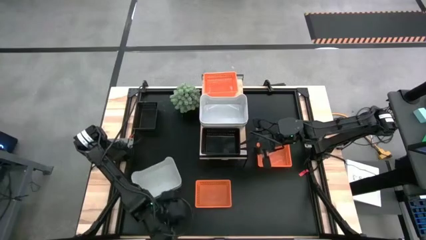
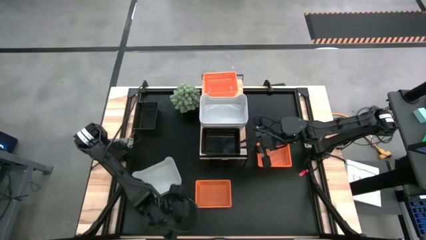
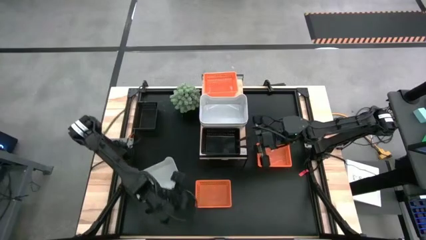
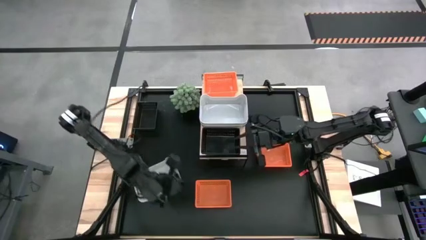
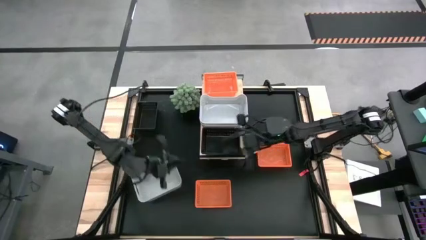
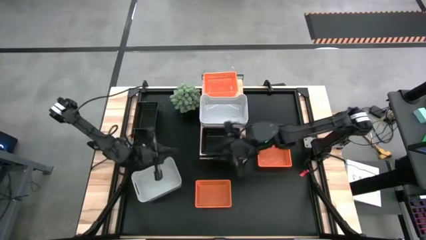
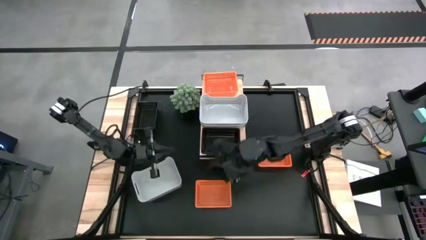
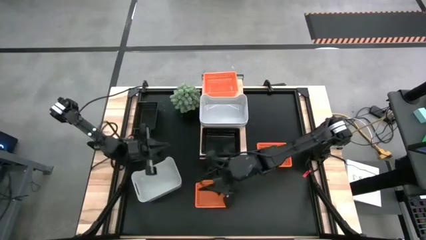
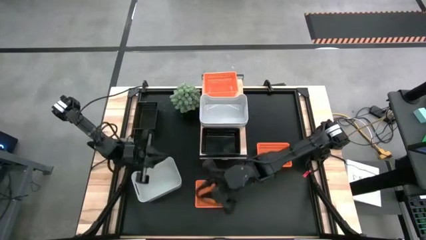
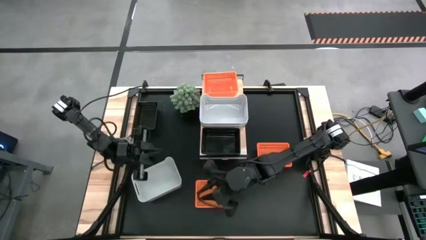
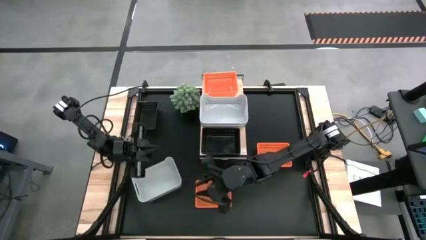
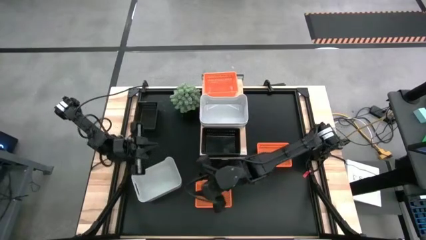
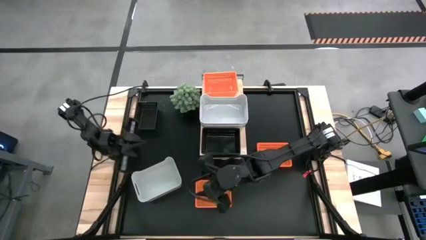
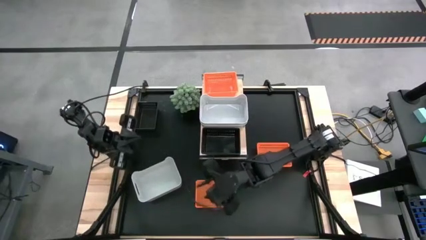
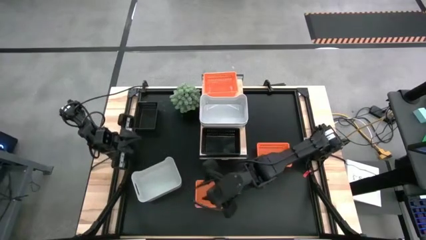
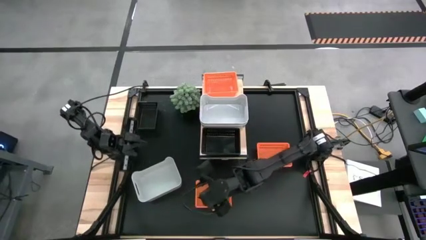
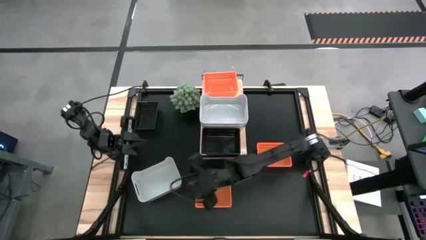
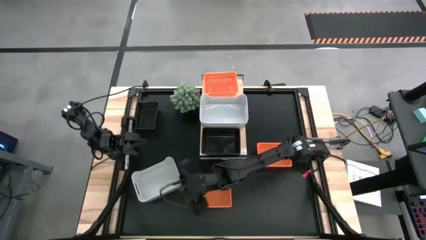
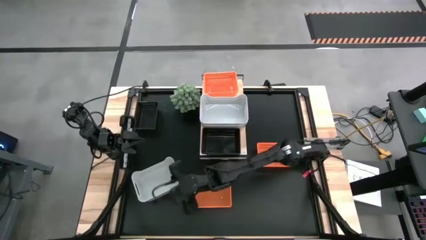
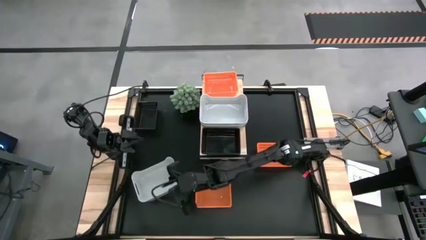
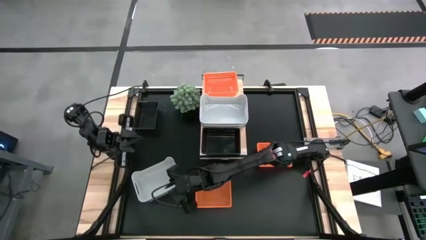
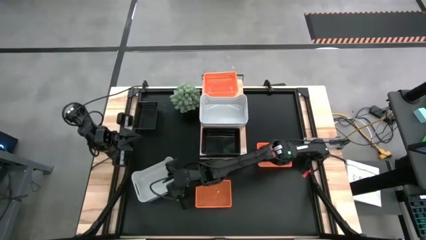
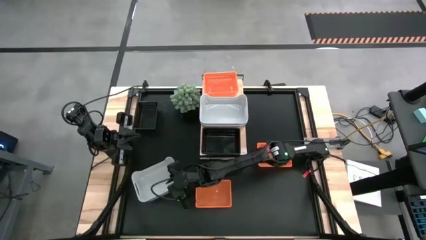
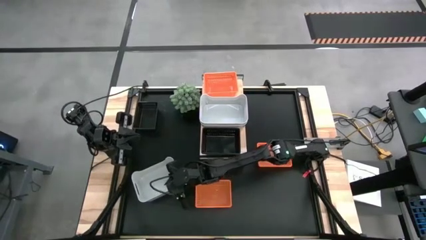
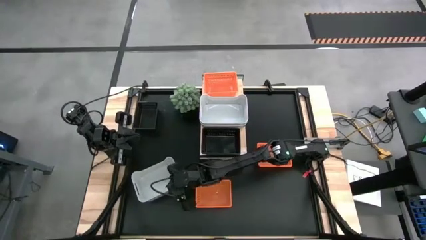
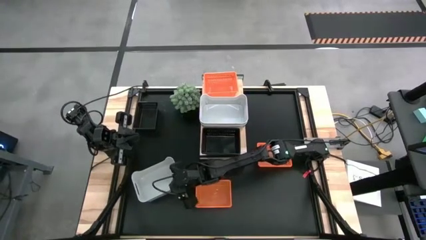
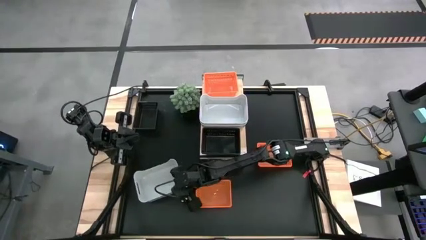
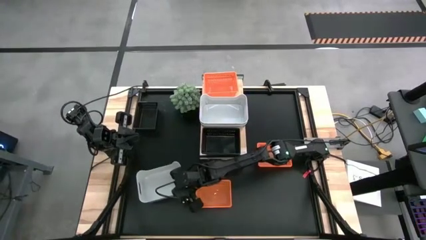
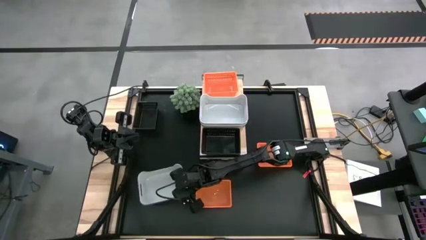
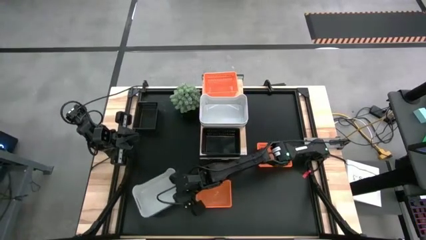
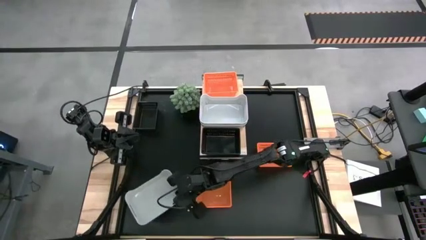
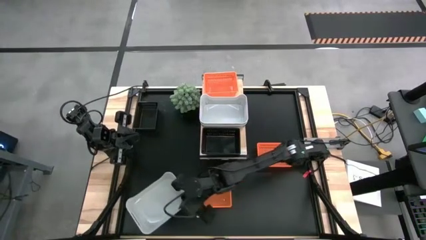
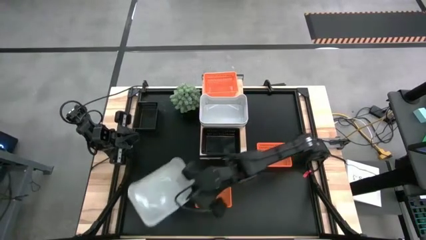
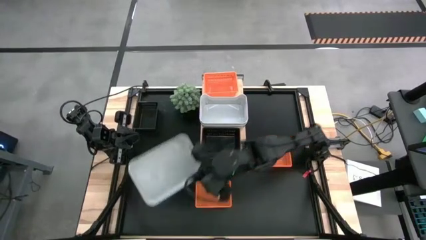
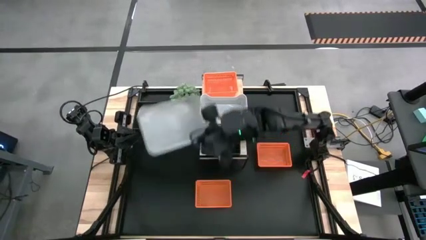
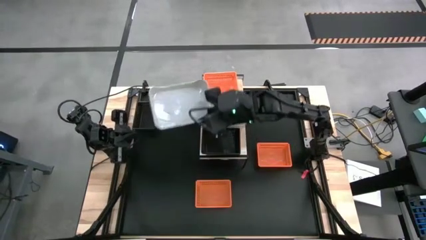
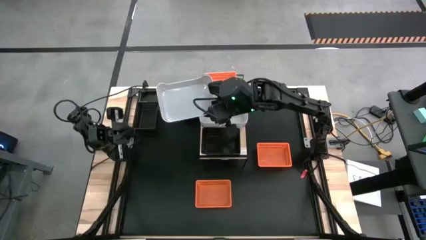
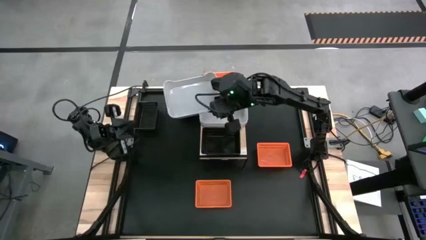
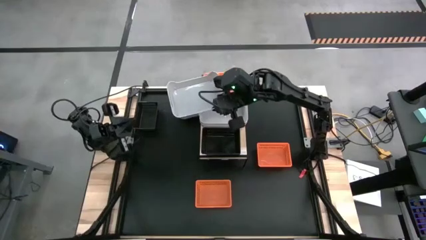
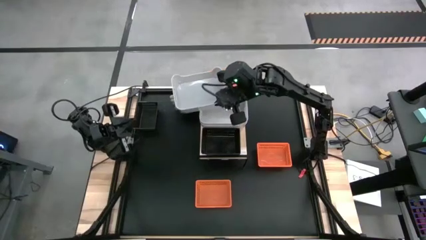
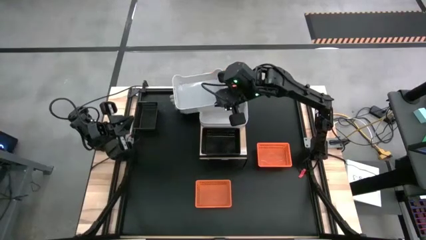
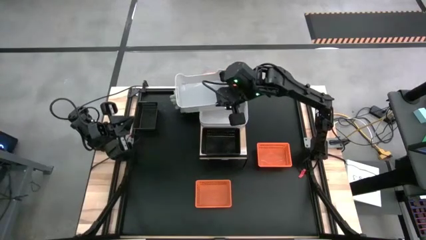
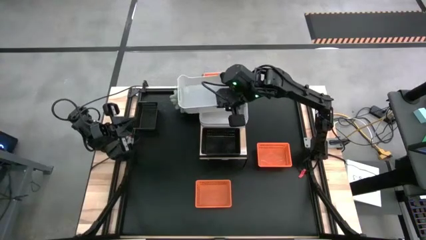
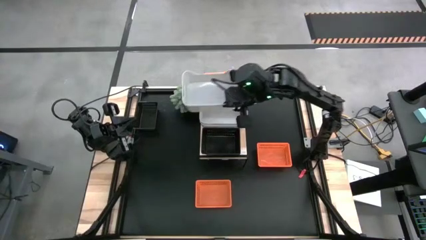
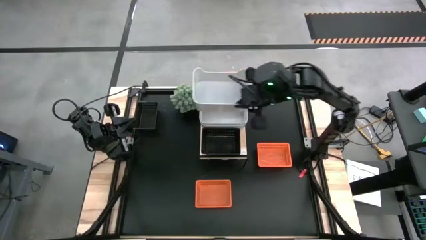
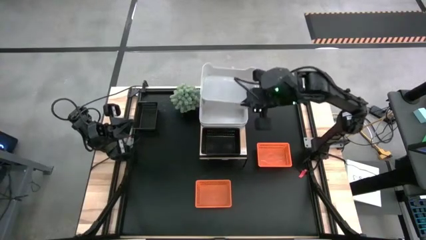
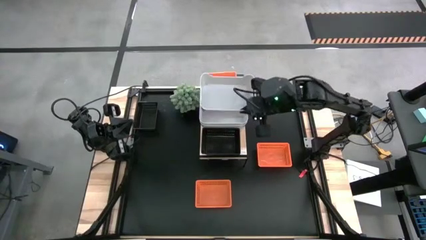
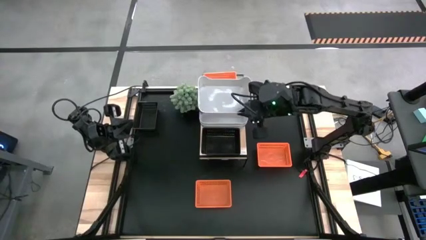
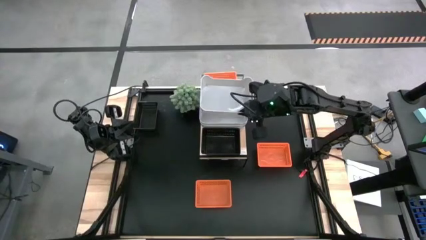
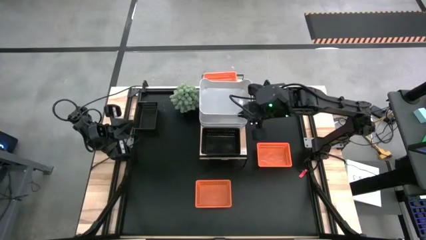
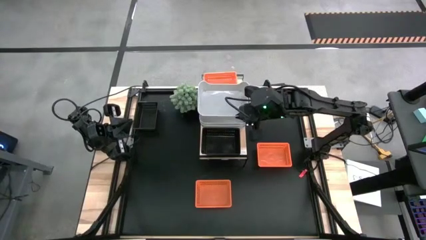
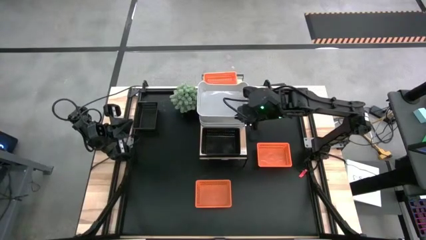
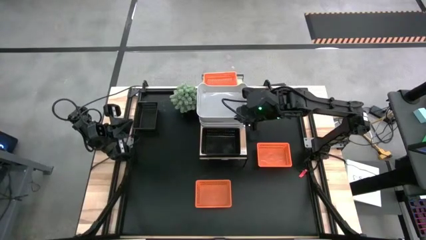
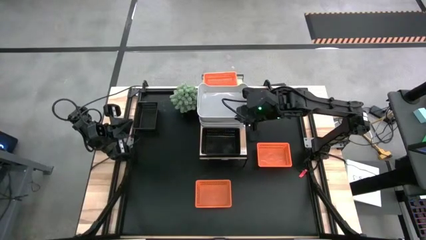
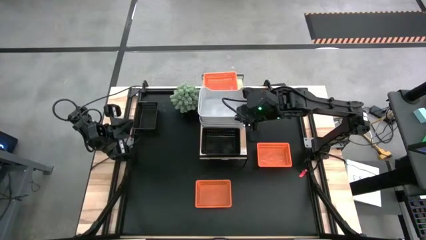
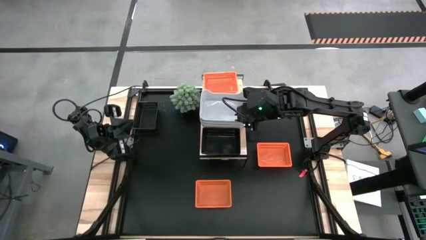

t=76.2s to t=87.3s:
Task: Stack baskets on shelf by color
Stack the gray bin into the gray bins on the shelf

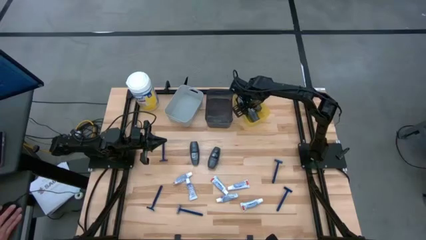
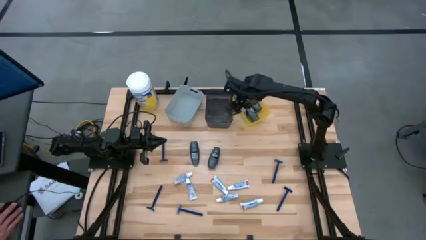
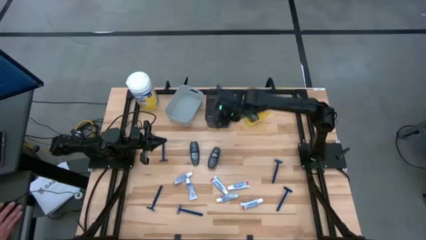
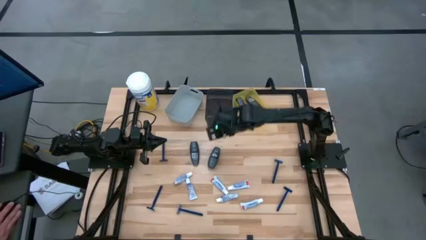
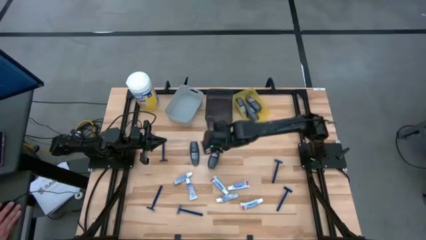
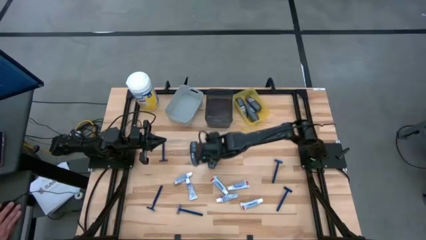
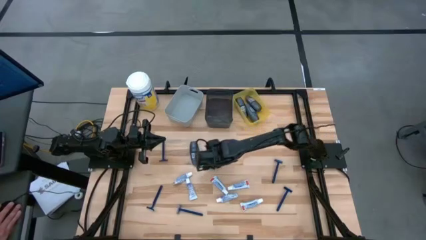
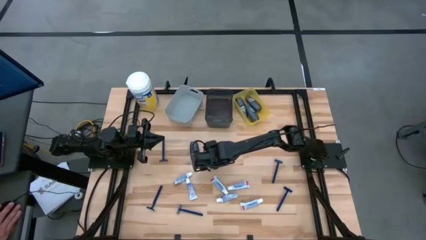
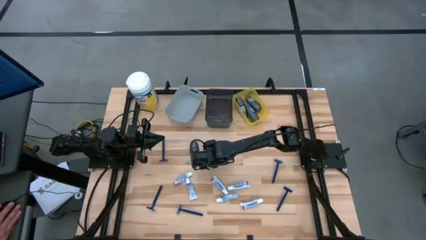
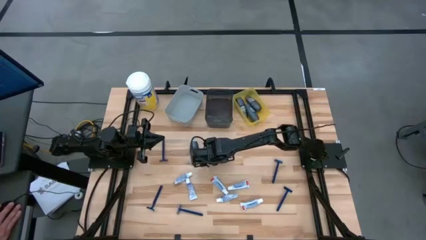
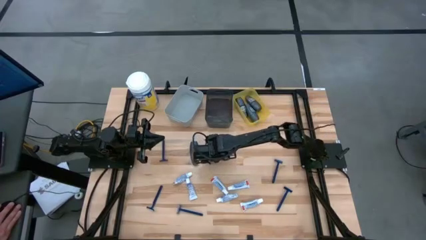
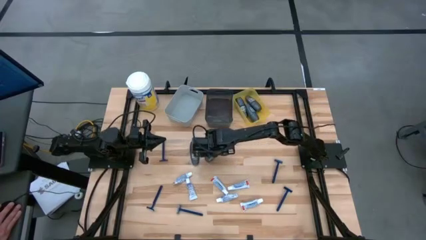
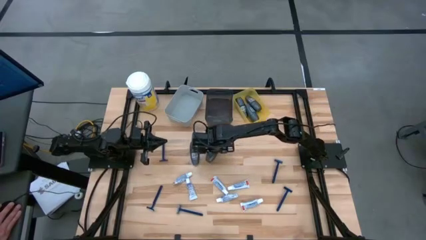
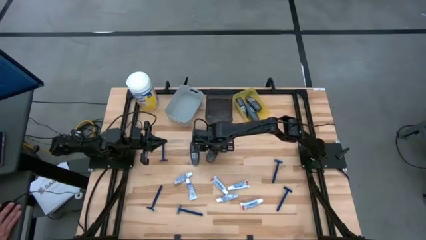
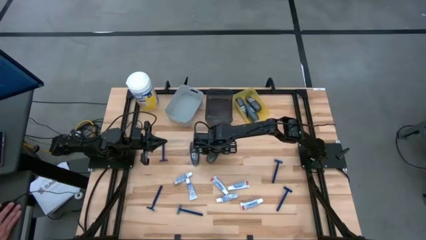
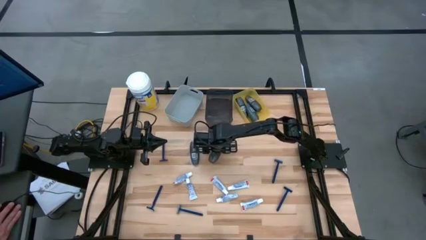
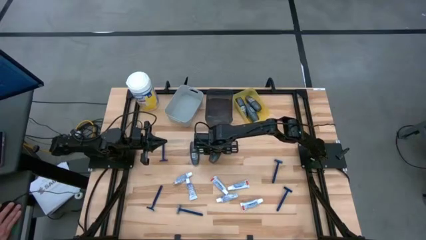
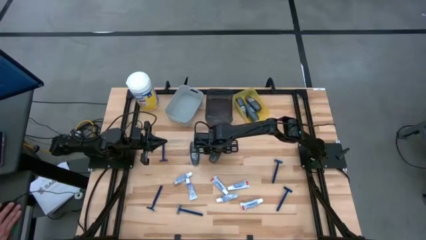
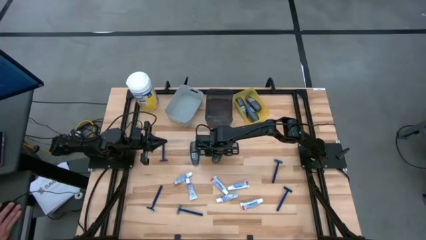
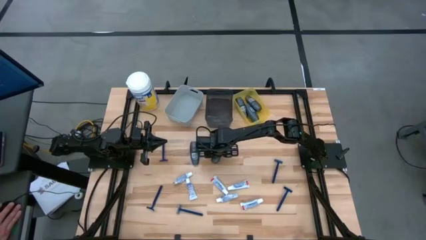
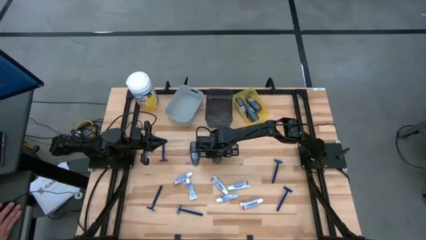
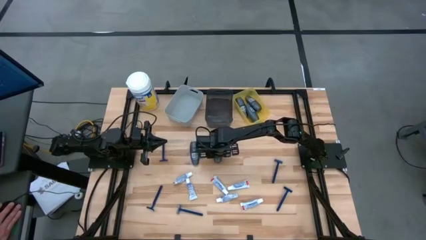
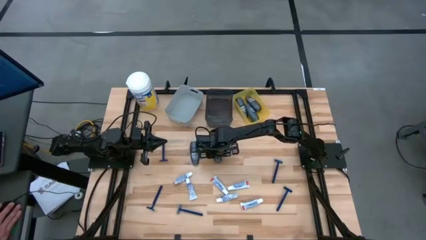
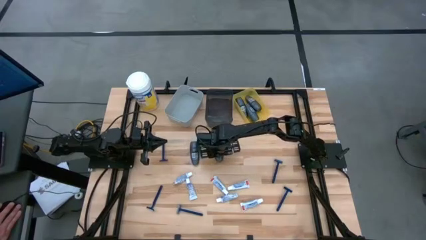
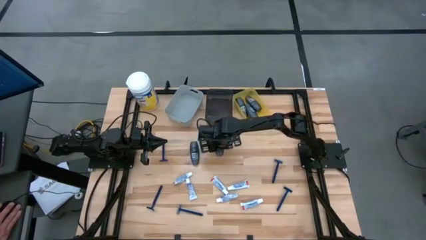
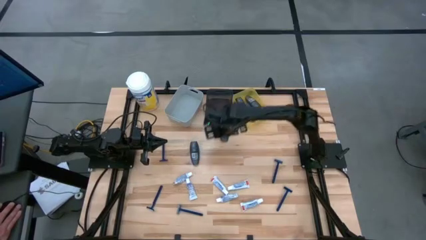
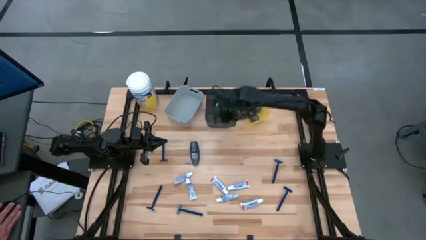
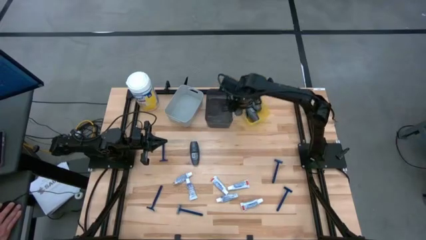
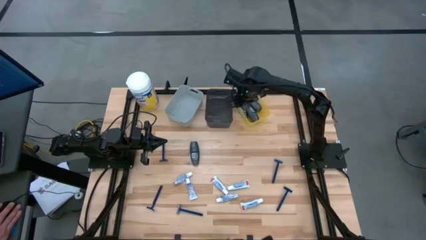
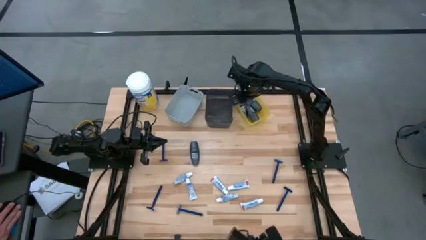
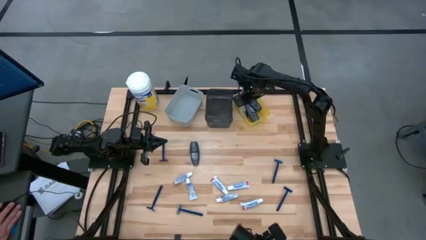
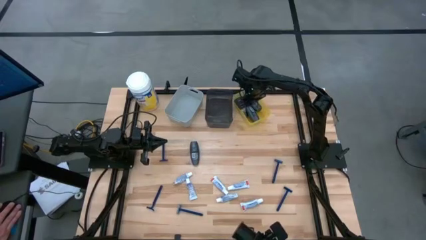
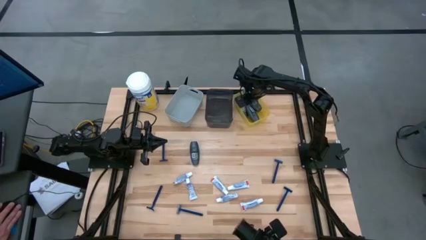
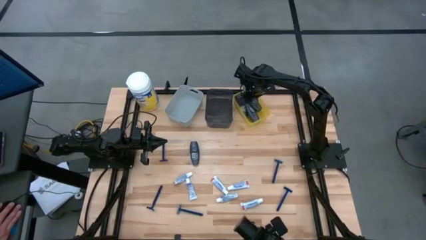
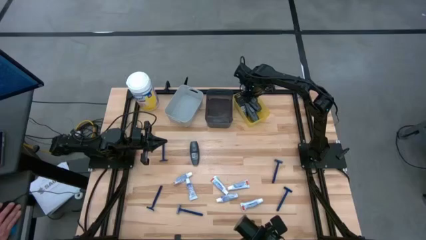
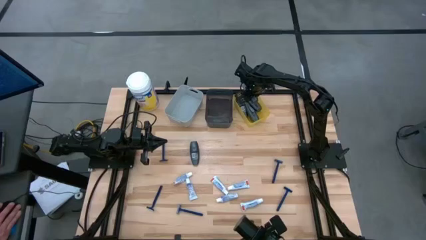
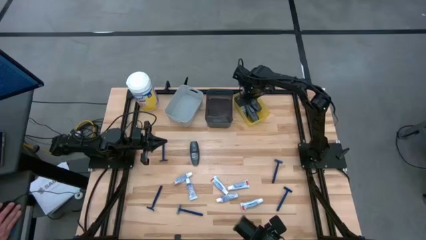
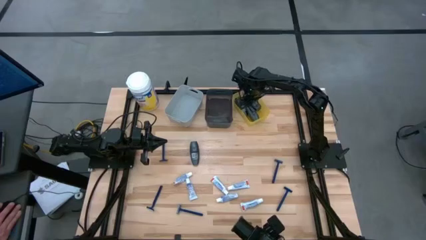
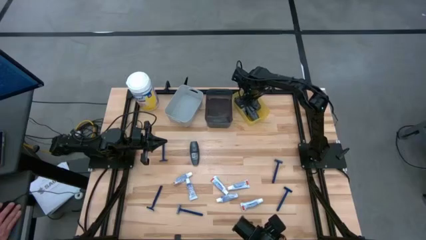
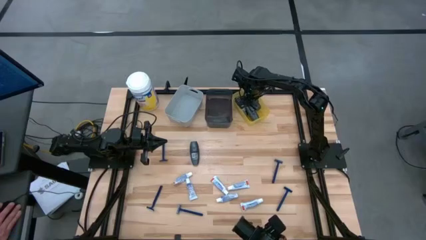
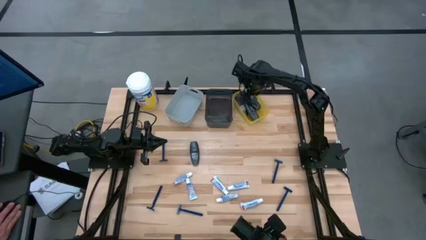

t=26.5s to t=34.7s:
Task: Pick & Place Travel size toiletries
Put the deodorant into the yellow bin
